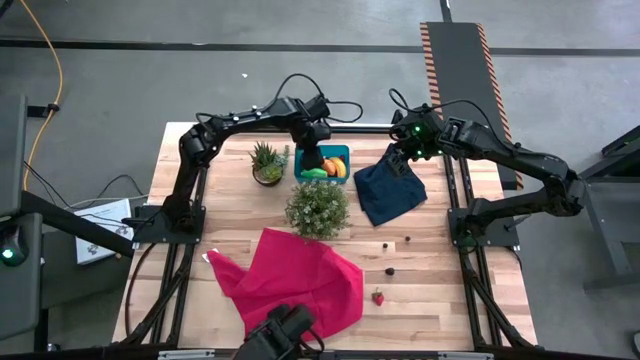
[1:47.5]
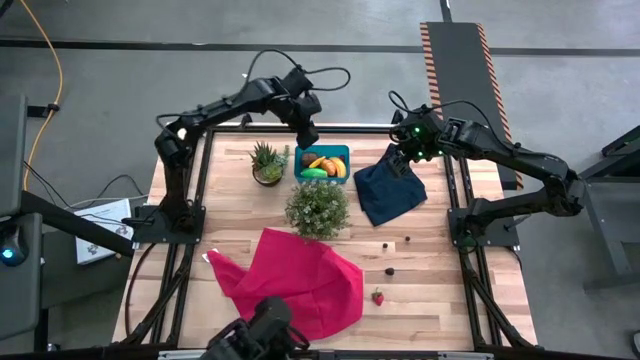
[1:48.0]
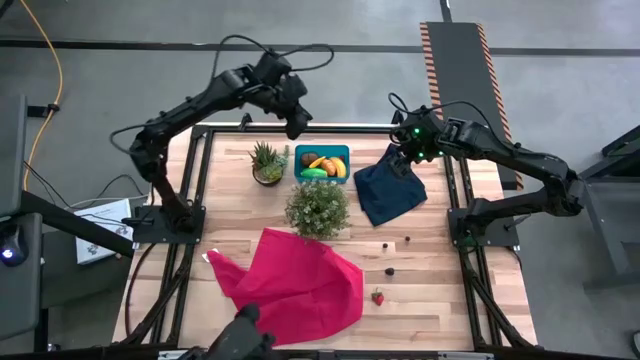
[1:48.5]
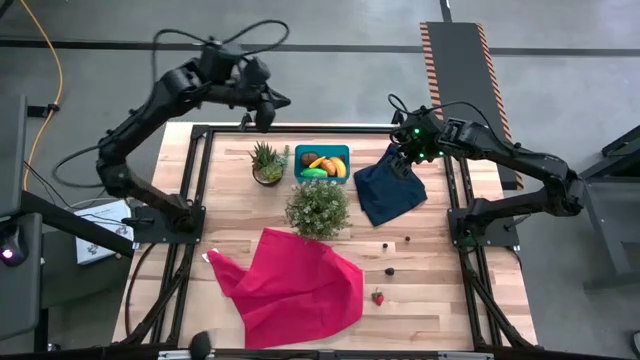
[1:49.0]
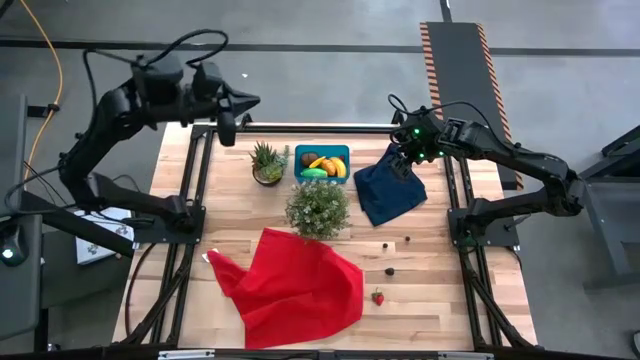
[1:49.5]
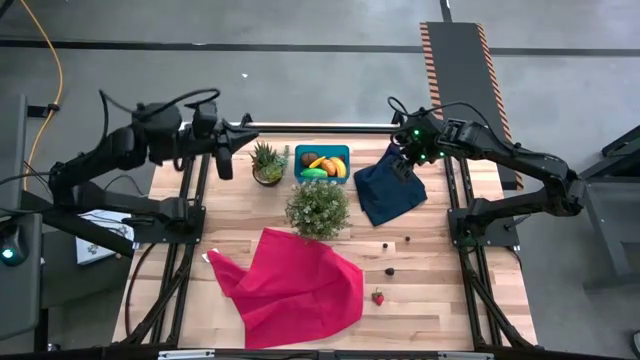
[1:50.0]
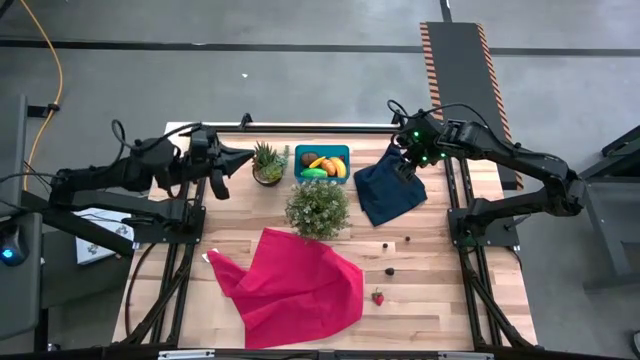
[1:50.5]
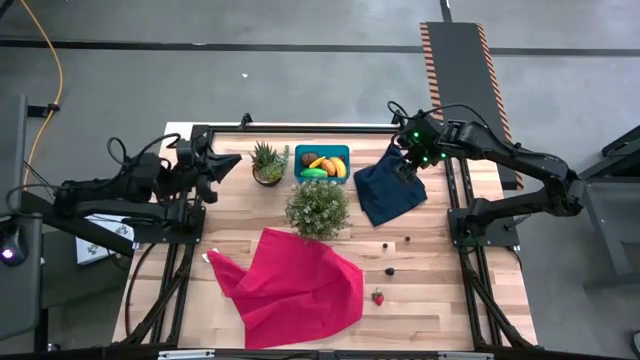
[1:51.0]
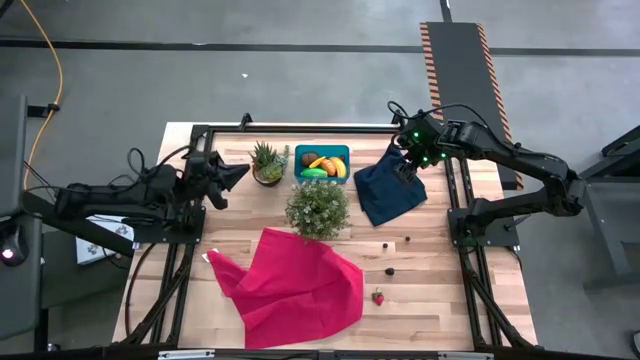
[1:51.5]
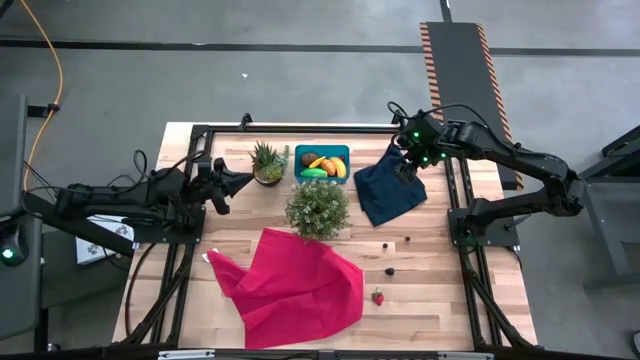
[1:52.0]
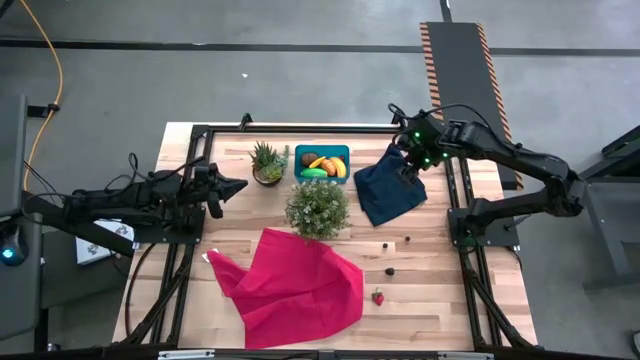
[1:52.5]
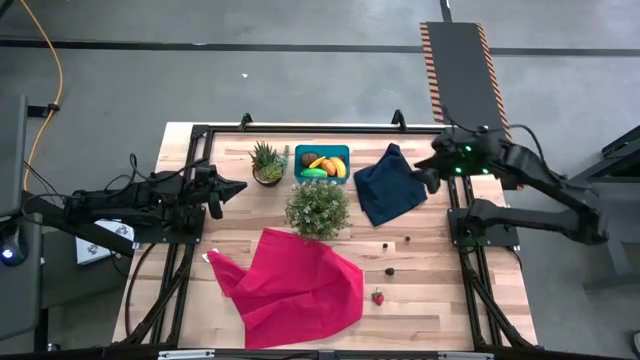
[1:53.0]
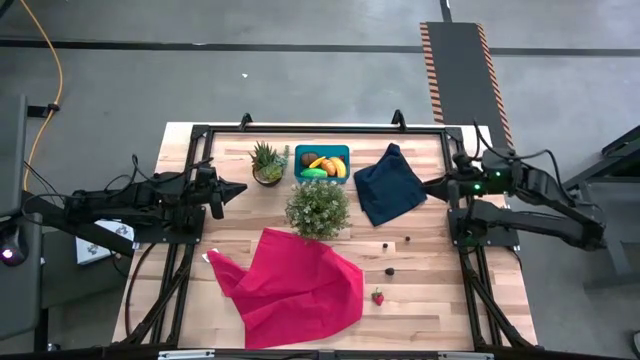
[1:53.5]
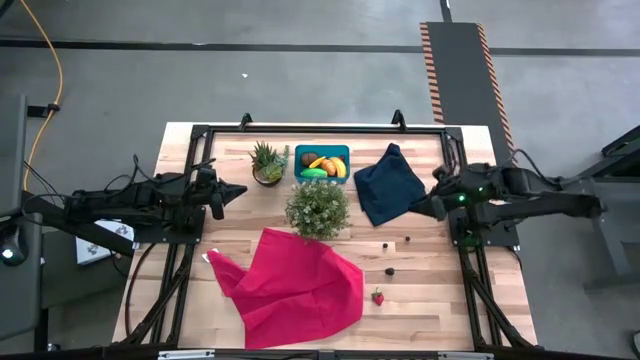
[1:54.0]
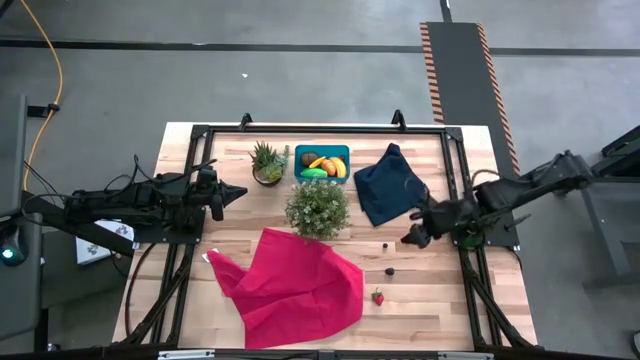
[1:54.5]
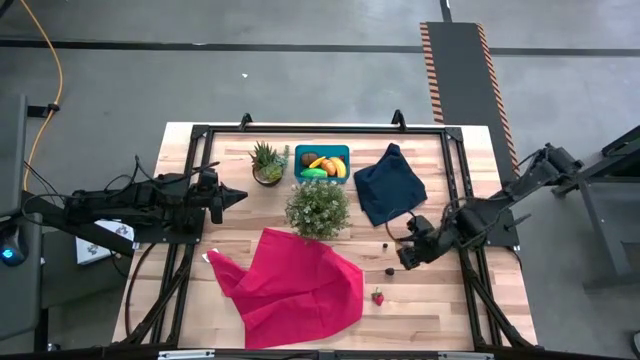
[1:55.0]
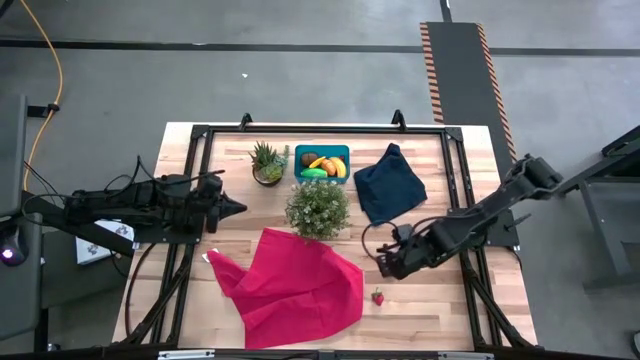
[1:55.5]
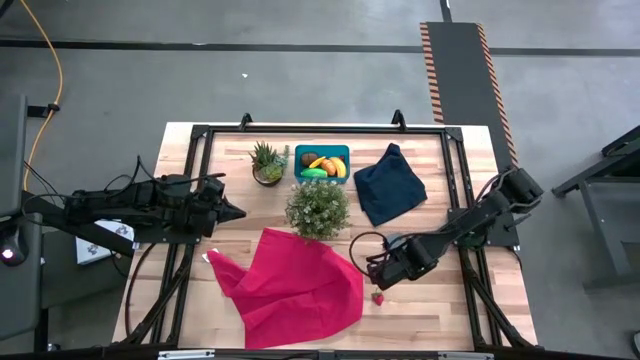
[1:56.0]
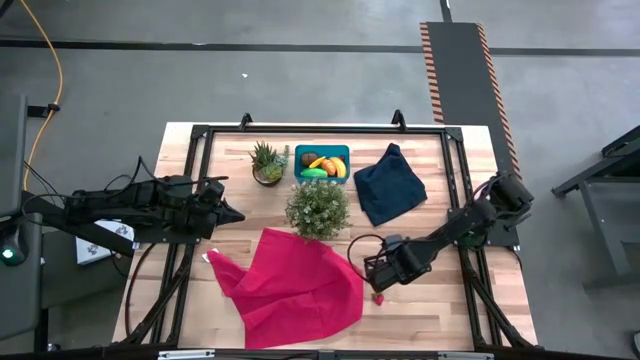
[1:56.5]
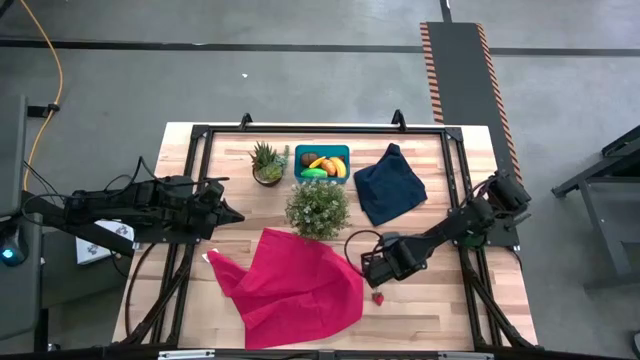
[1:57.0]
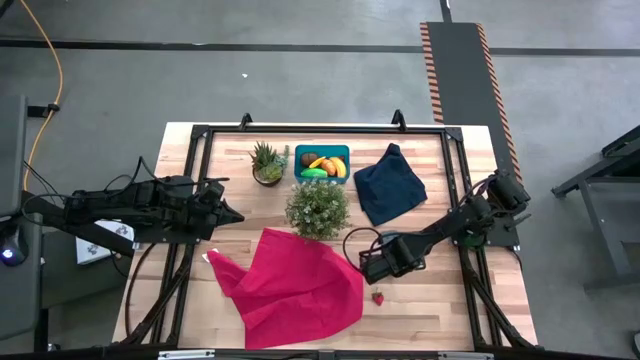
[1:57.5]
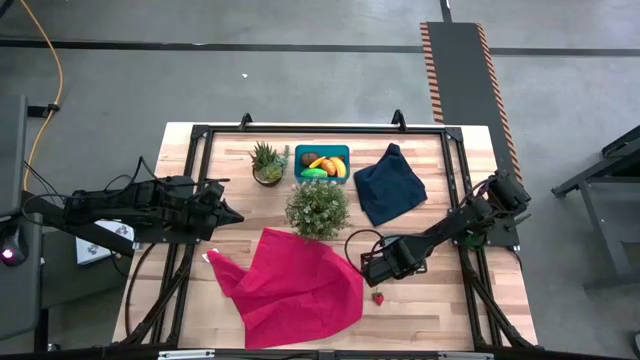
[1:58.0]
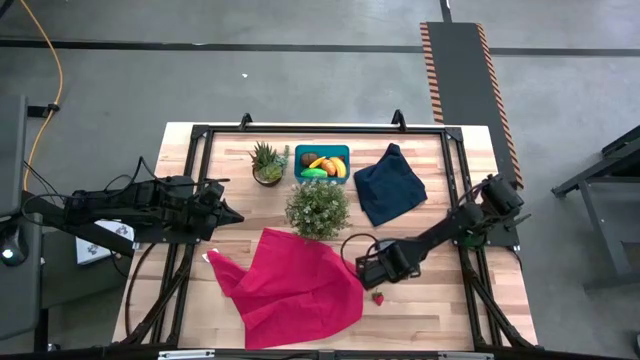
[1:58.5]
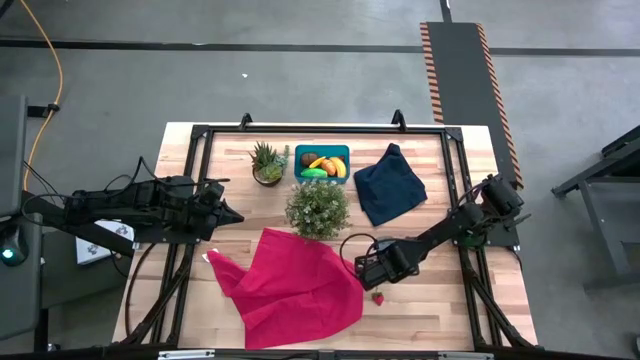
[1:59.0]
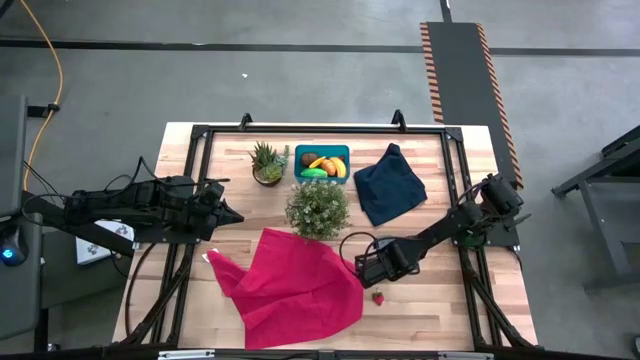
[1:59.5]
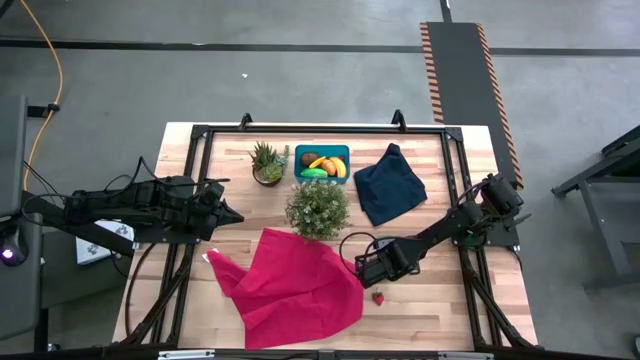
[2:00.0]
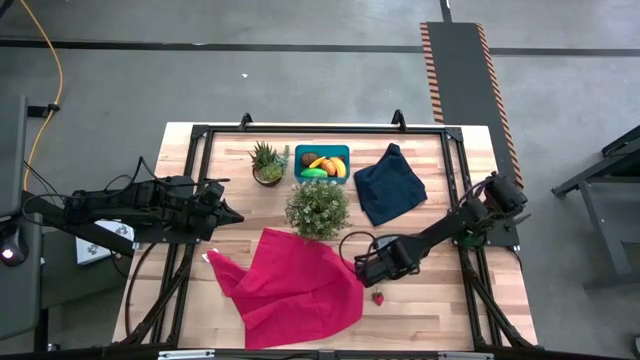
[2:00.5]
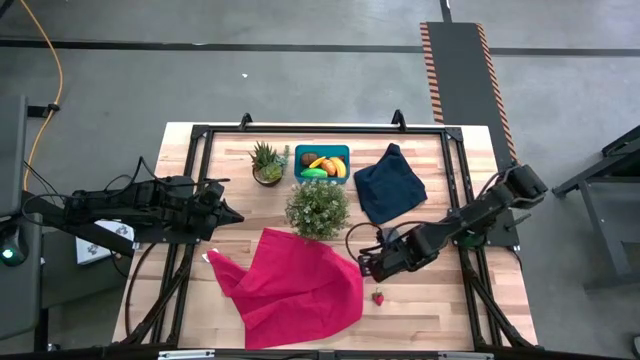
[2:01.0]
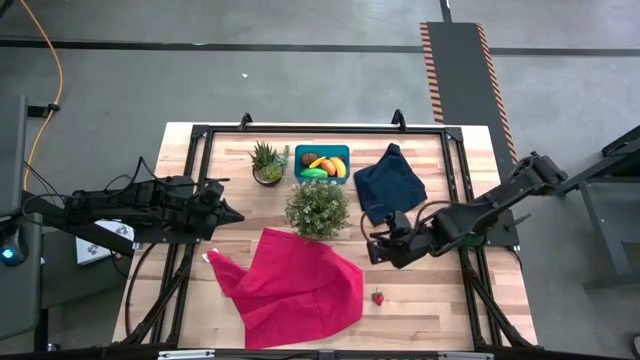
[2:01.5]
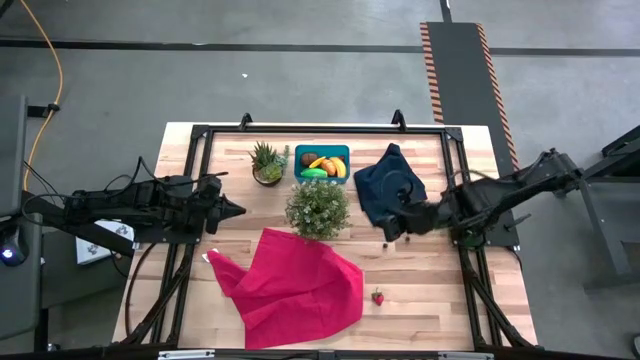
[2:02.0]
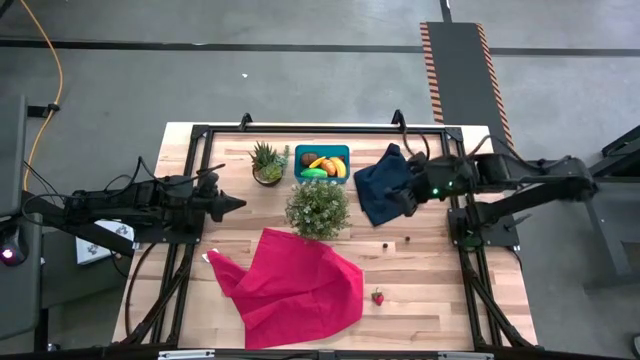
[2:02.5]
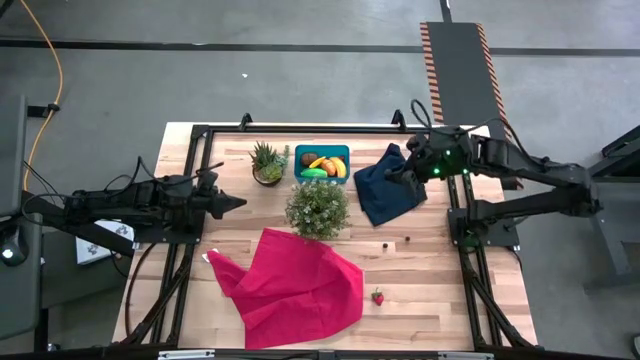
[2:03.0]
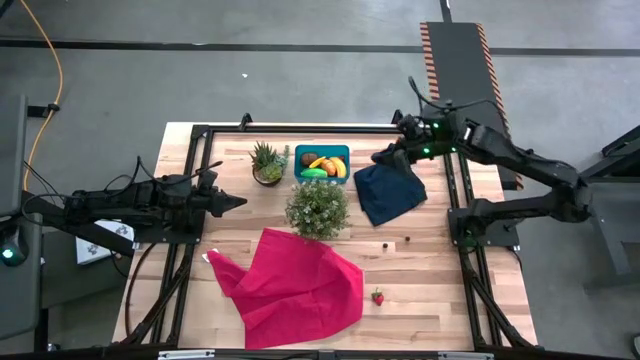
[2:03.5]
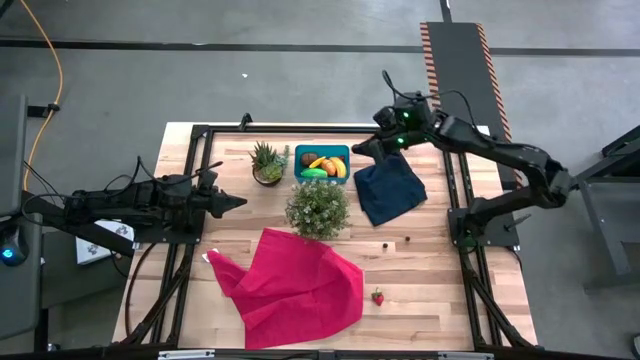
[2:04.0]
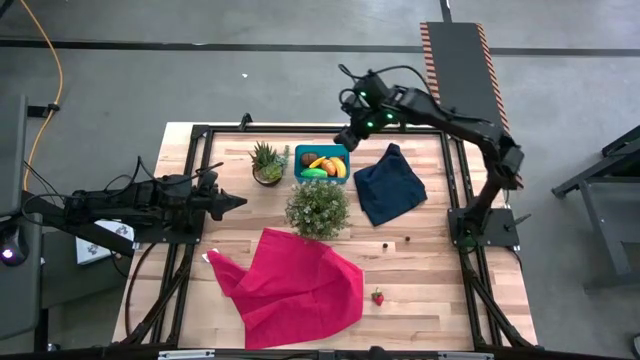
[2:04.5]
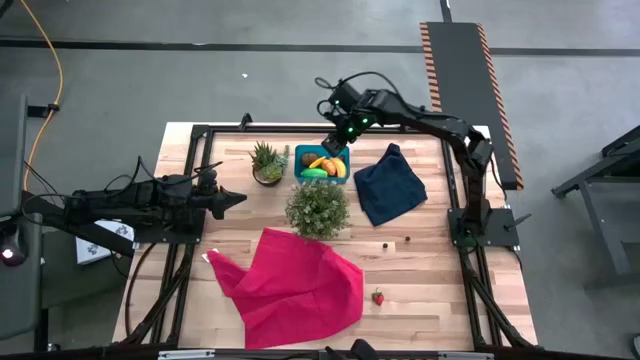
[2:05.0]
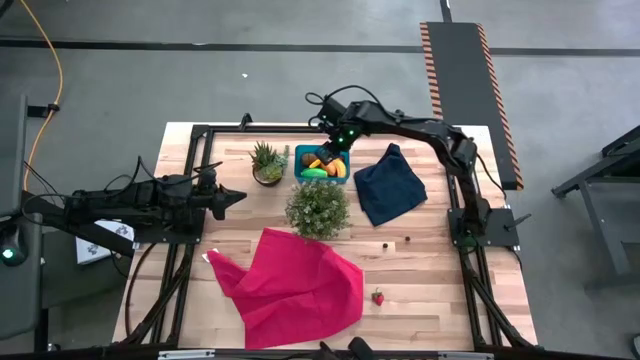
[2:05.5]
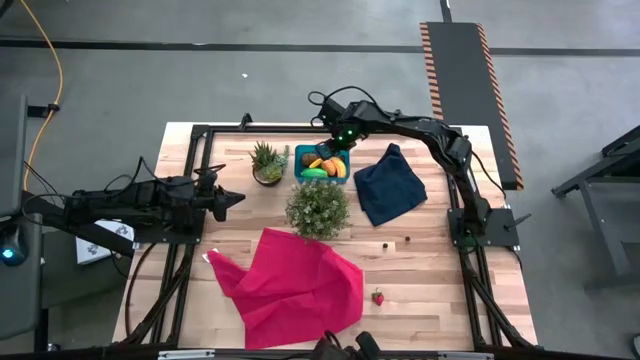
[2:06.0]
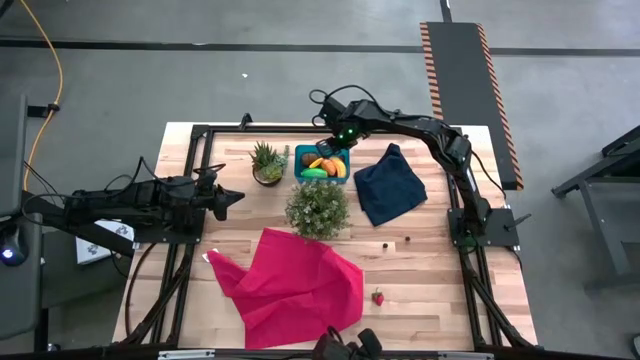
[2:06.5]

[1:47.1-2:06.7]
Task: Pick and placing Produce into tupperware
Put the blackberry into the blue bin
